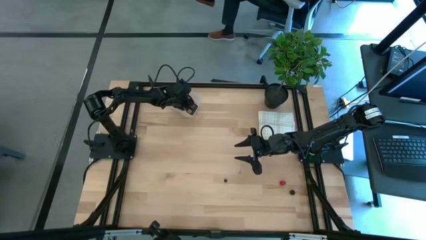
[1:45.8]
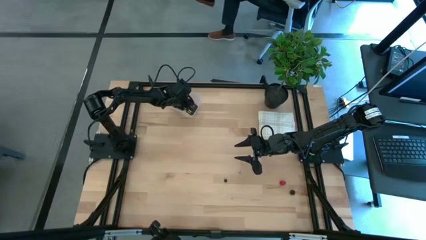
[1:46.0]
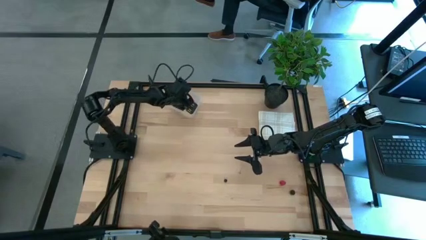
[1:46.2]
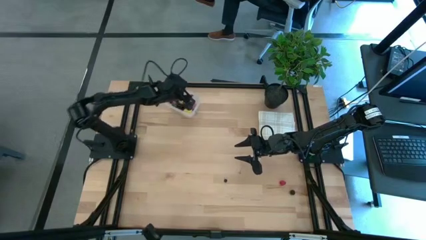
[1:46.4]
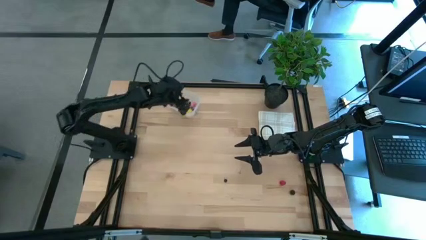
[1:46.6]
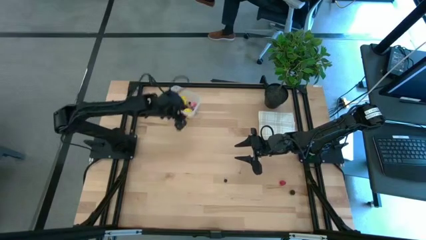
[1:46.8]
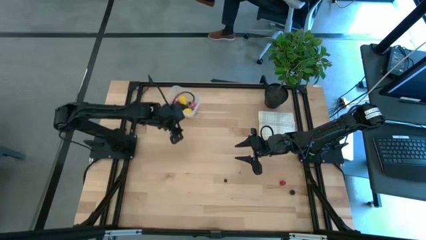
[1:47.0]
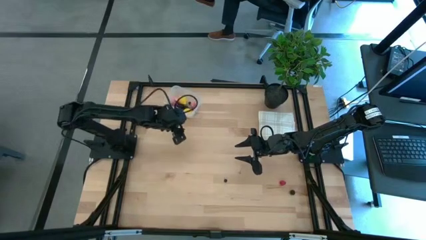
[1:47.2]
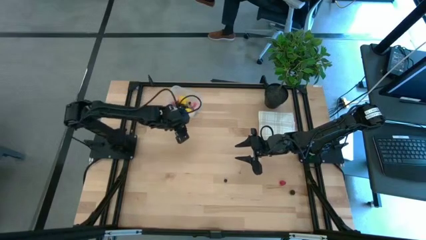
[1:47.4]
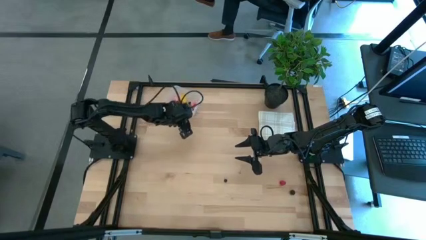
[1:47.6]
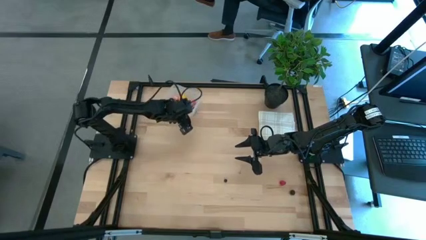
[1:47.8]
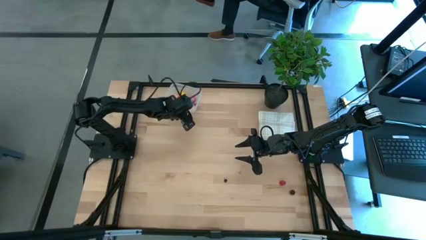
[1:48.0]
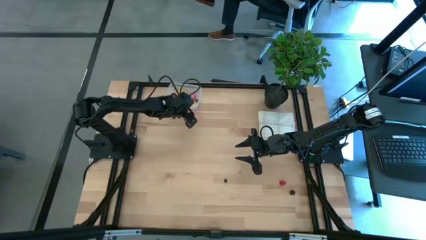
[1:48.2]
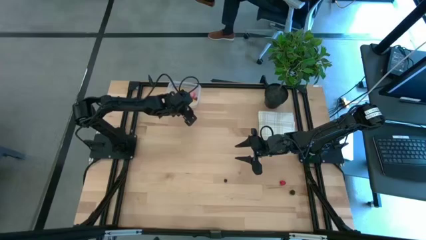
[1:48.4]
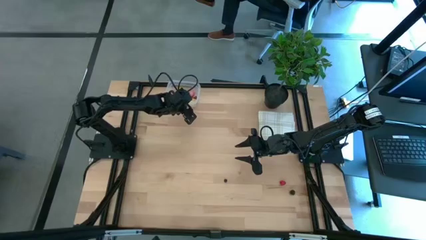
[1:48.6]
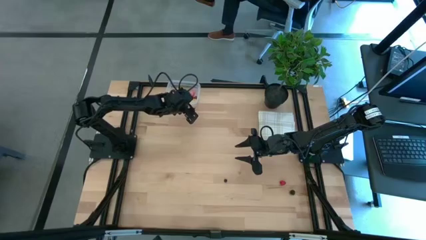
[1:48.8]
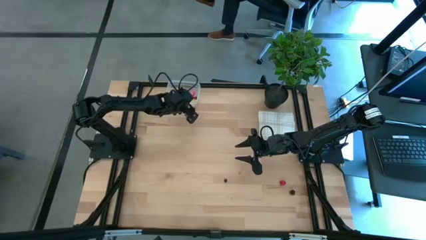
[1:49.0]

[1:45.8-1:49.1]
Task: Pick and placing Produce into tupperware
Adjust the transparent bin on the table

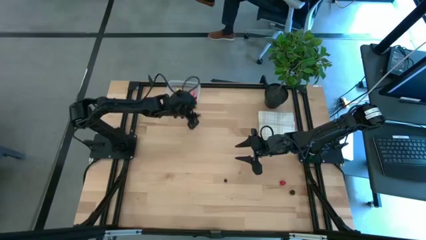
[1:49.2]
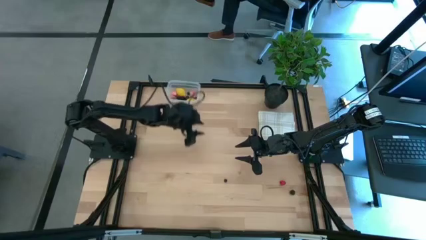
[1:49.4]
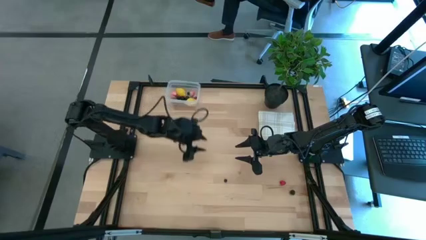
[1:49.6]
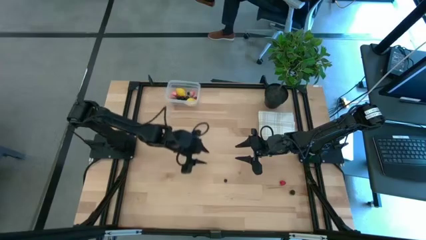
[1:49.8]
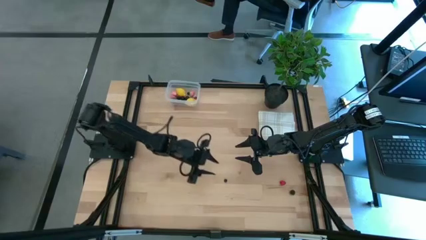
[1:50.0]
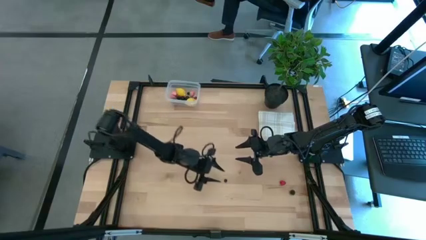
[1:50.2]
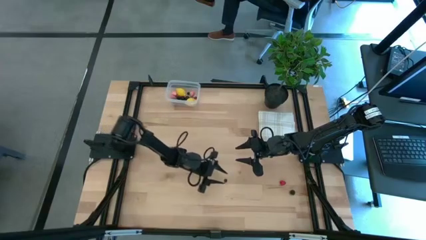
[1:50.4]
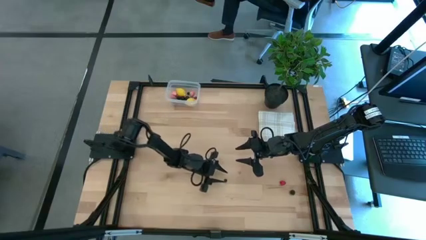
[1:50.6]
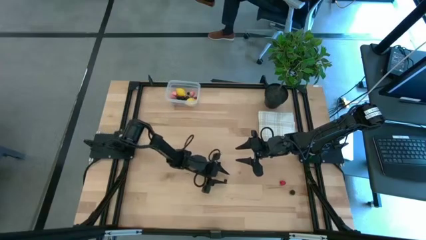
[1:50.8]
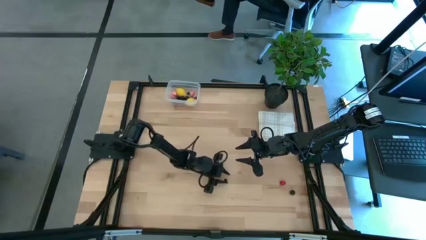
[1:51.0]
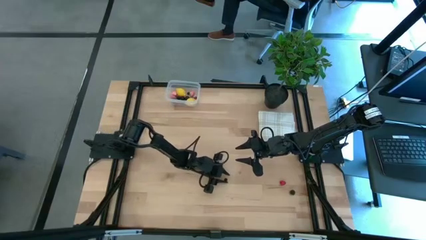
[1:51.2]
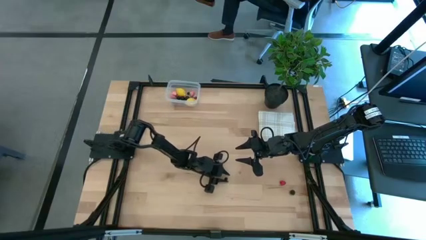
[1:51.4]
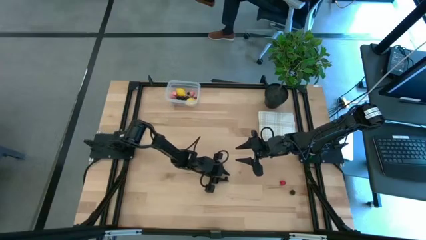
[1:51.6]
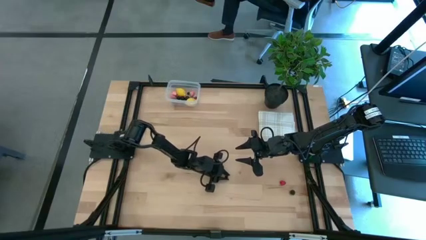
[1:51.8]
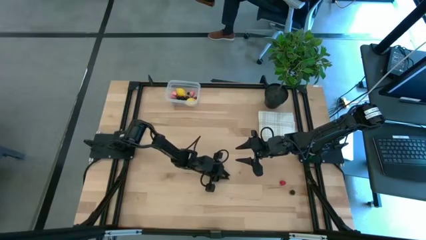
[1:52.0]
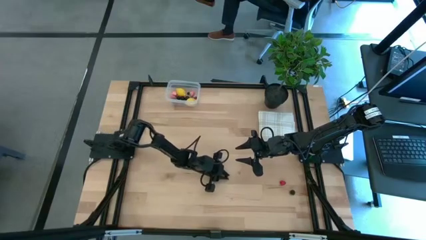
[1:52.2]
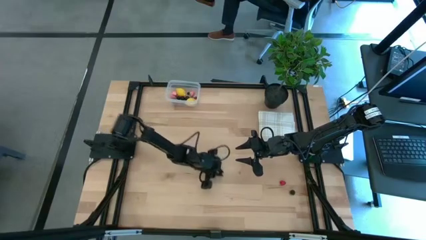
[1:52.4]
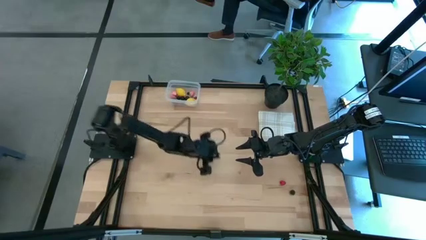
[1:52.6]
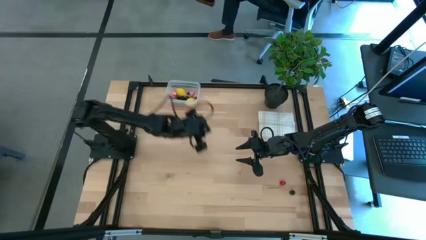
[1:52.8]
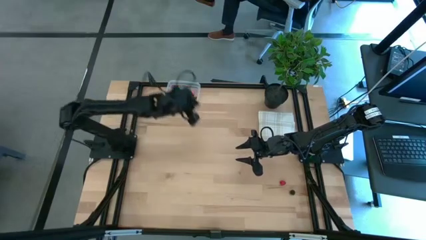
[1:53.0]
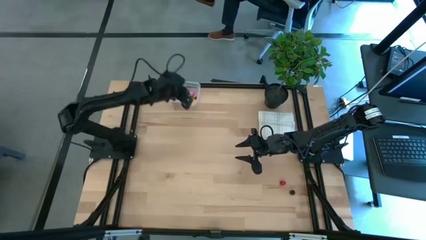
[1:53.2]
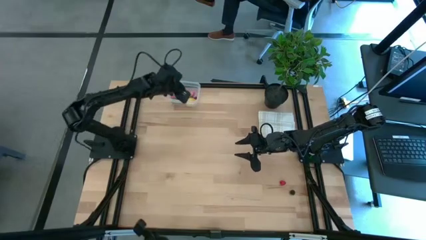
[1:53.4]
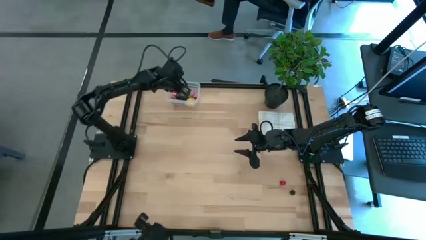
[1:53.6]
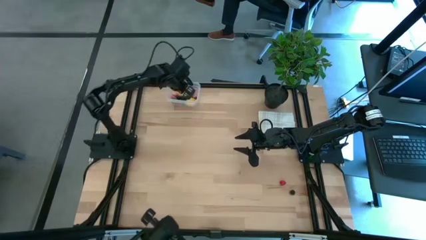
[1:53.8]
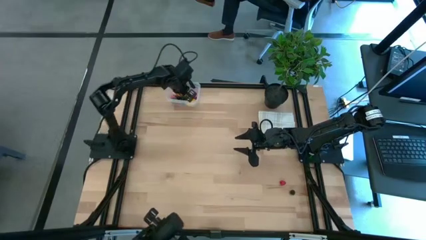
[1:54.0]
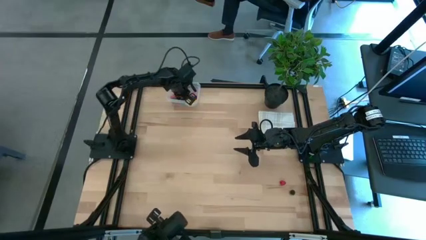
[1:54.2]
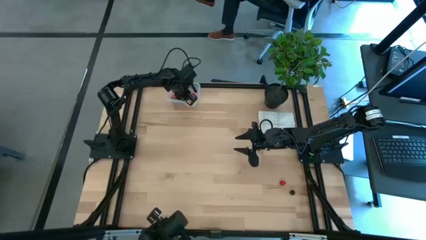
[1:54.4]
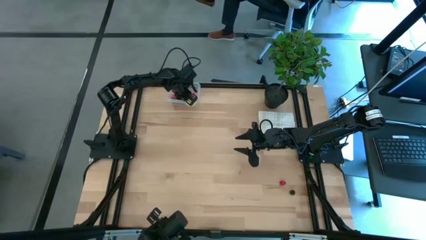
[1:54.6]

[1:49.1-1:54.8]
Put the blueberry into the transparent bin

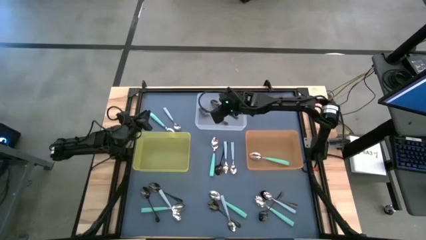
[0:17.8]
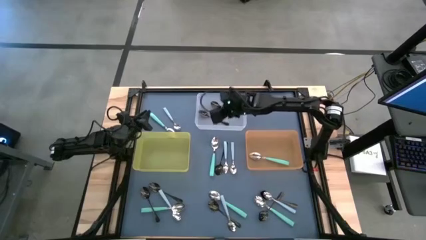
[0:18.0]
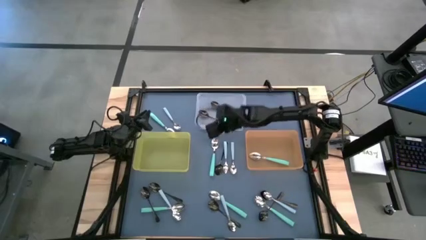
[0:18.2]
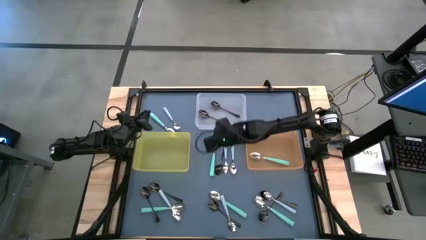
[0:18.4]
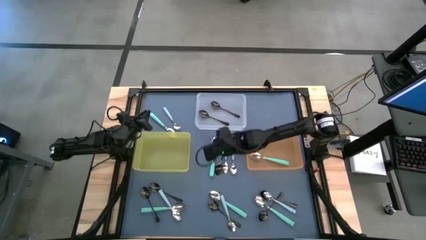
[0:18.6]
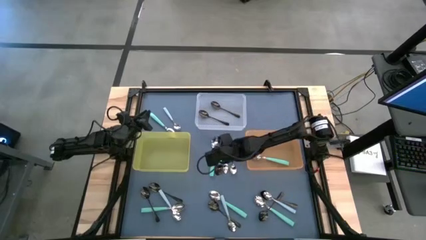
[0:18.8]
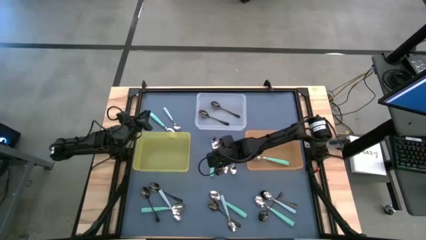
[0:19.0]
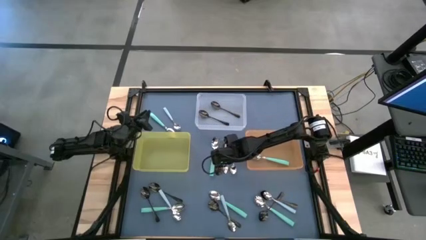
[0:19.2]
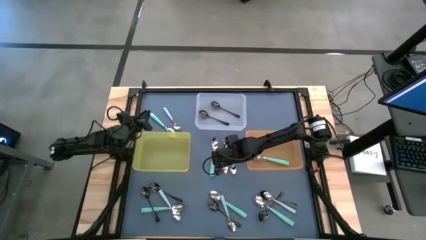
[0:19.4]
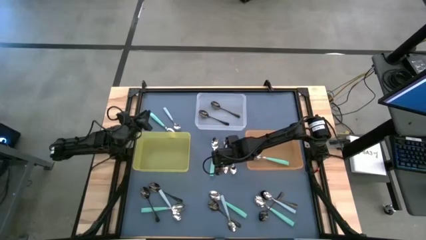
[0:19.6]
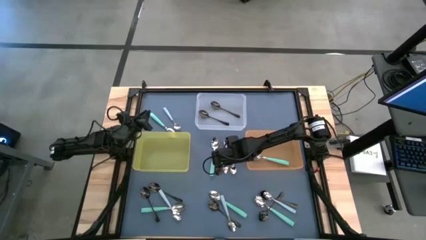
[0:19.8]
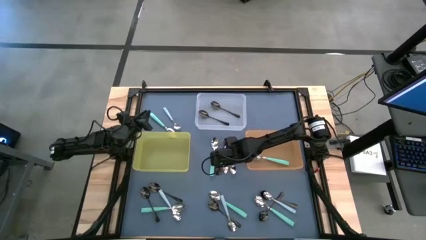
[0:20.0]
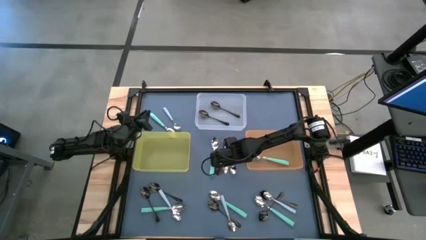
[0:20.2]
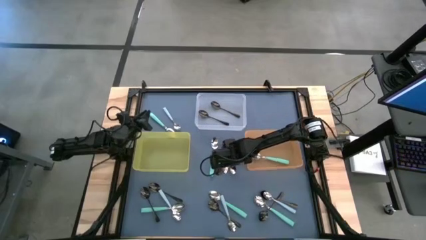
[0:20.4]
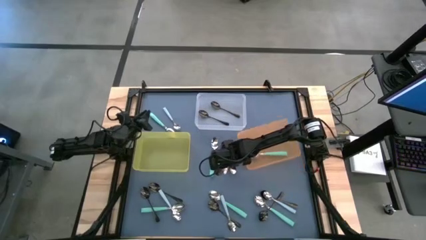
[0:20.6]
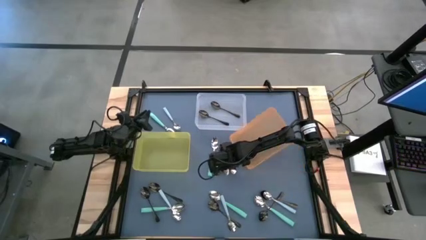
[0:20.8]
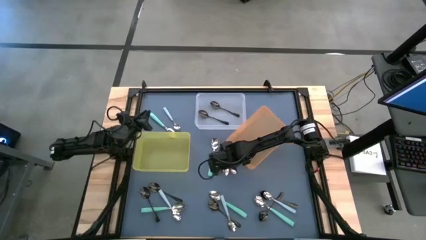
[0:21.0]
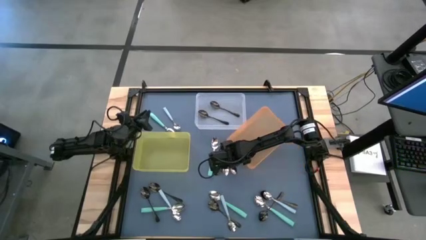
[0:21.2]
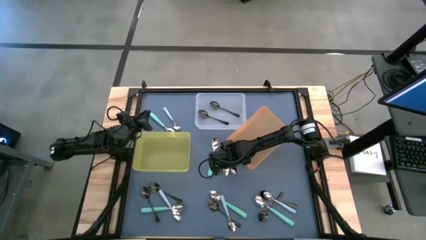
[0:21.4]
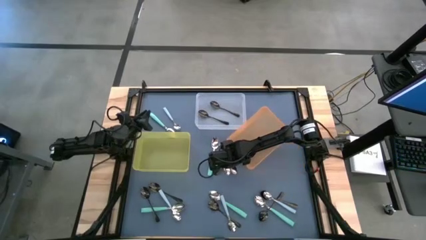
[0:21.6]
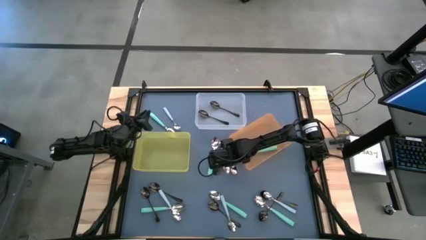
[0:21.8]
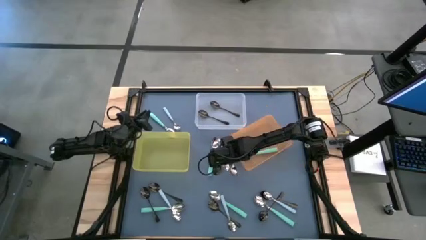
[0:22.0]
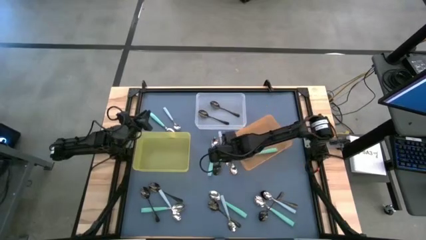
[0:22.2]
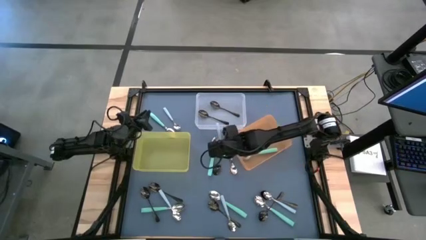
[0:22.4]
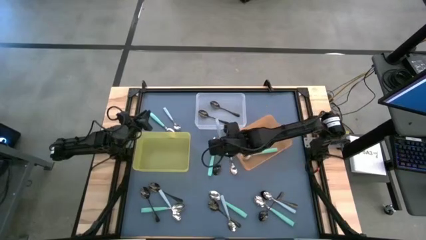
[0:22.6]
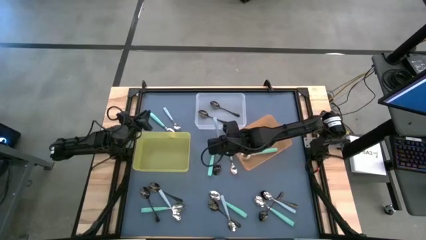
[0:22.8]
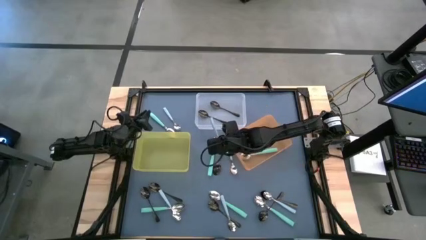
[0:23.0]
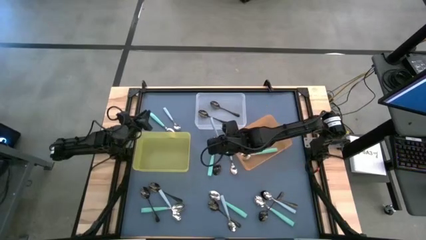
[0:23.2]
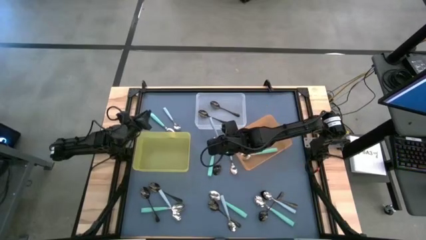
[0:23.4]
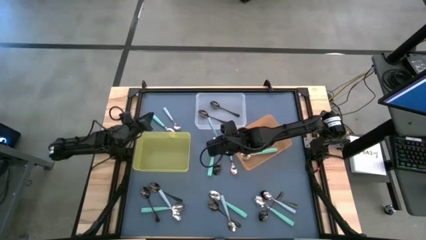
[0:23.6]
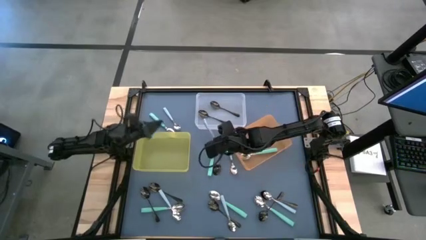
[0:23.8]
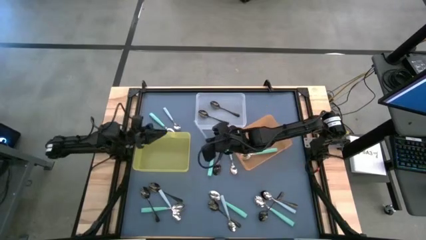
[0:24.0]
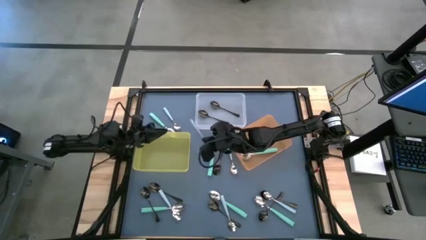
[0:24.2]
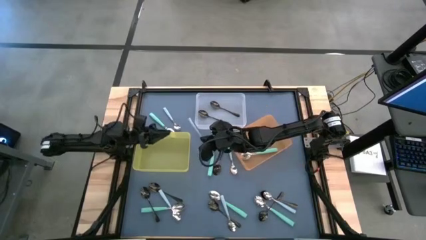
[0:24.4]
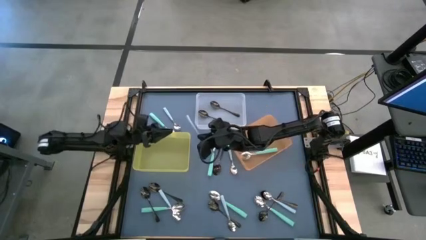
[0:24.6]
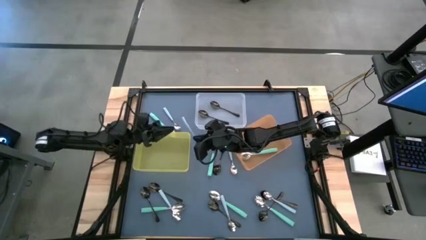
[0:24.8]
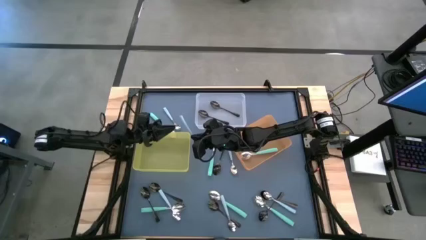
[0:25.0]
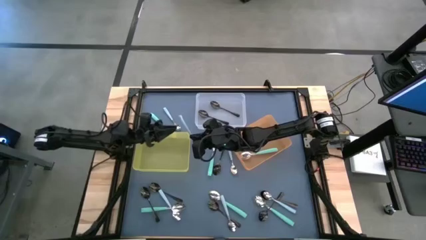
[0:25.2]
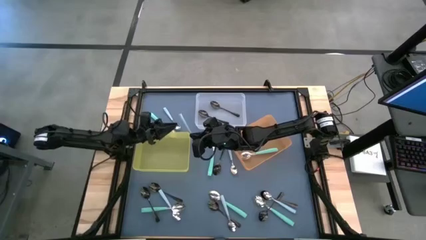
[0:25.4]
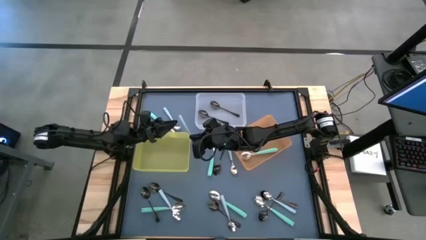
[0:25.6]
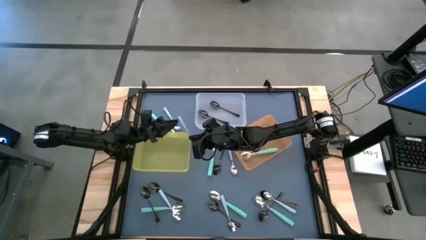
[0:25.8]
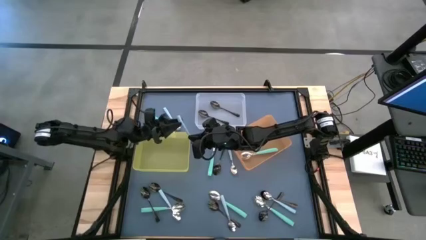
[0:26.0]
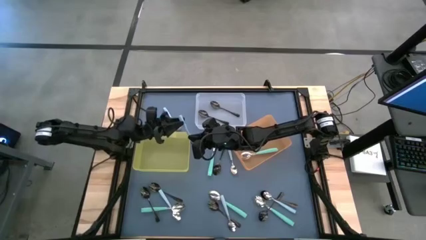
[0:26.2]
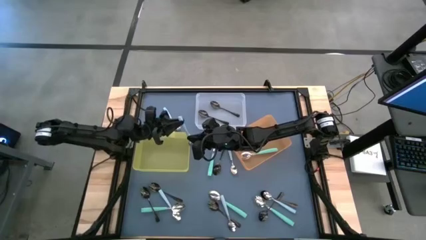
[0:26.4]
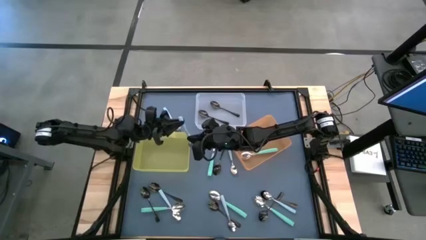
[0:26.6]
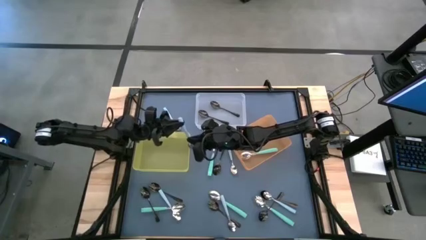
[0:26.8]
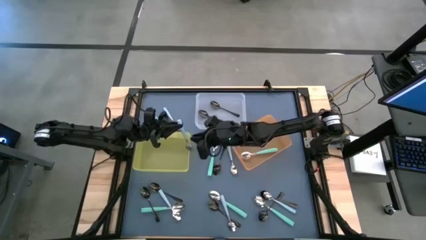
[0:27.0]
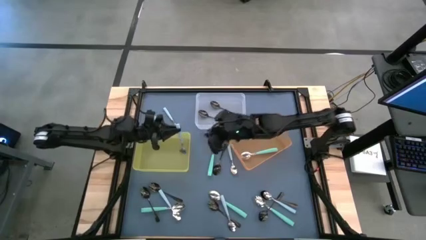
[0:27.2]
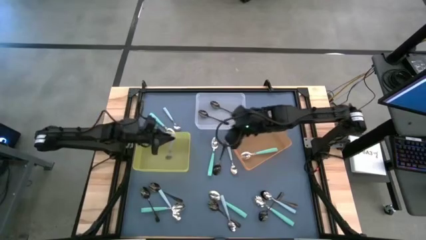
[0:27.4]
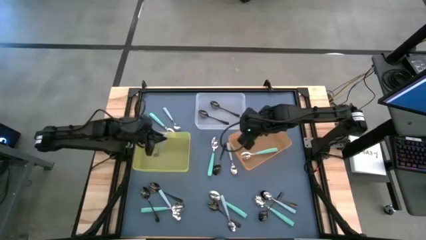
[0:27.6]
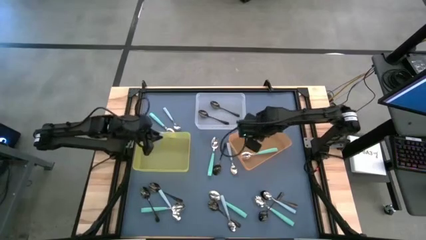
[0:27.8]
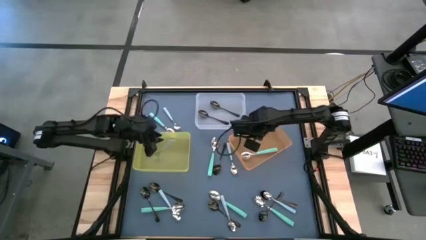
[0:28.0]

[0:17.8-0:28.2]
Task: Sort silverware by color (type)
Put the blue spoon into the yellow bin
